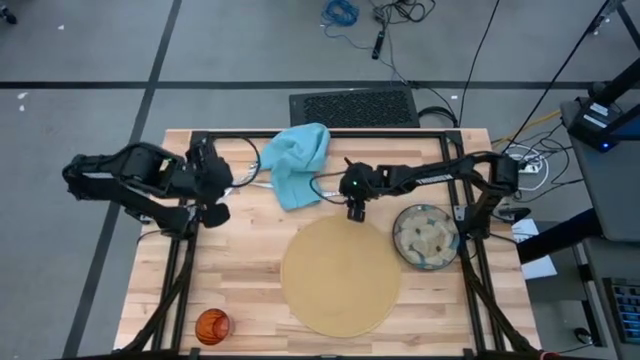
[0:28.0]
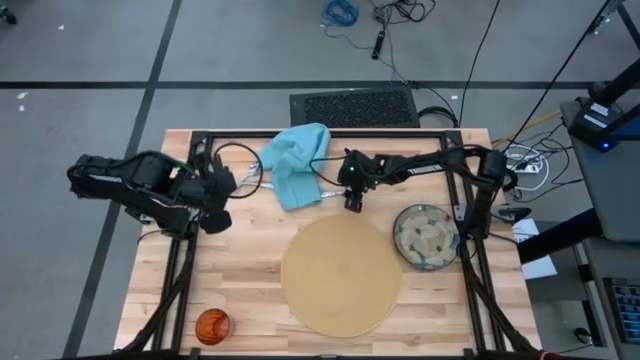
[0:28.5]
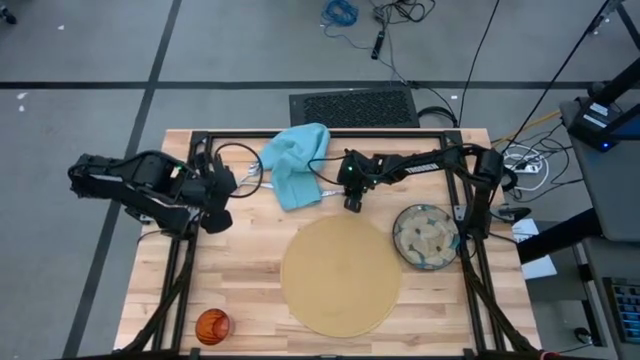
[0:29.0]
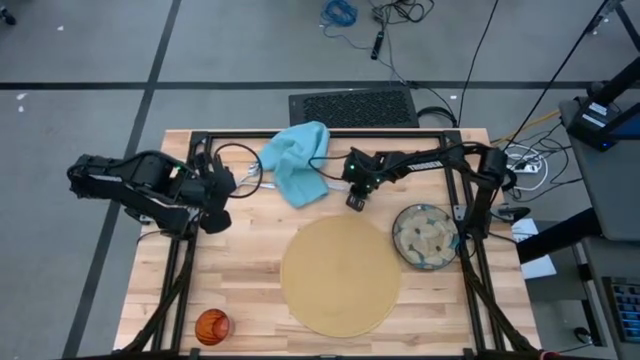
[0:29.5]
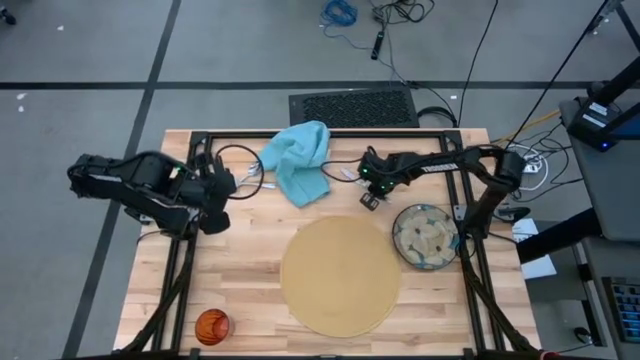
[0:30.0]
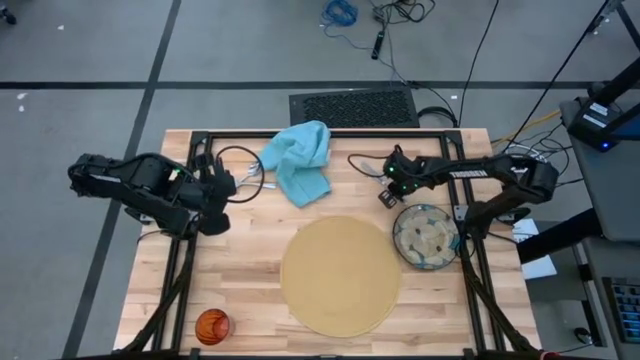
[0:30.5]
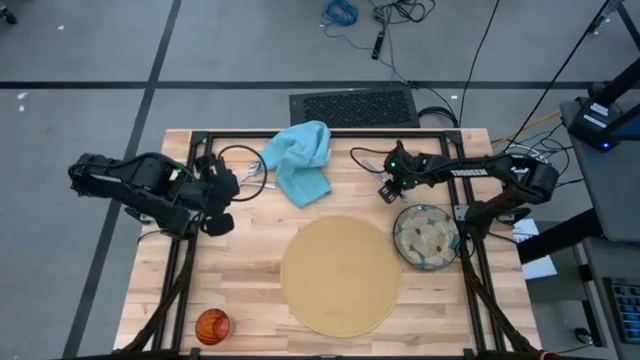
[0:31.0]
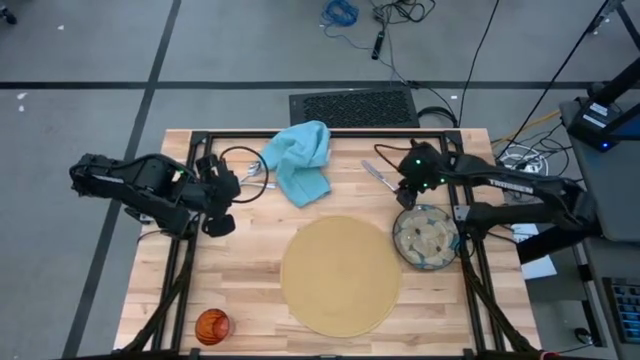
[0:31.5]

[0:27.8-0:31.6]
Task: Set table place
Move the silver knife to the top right of the table

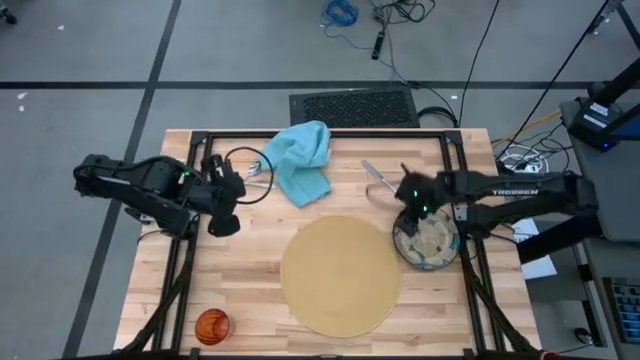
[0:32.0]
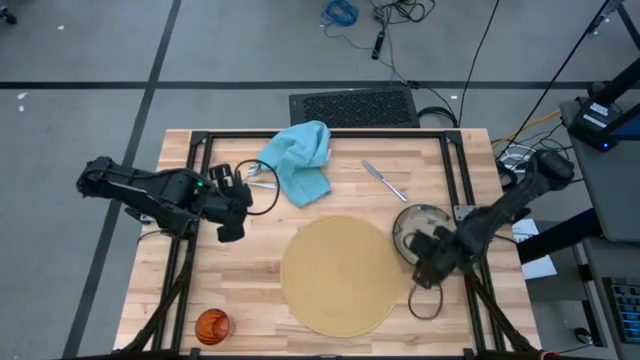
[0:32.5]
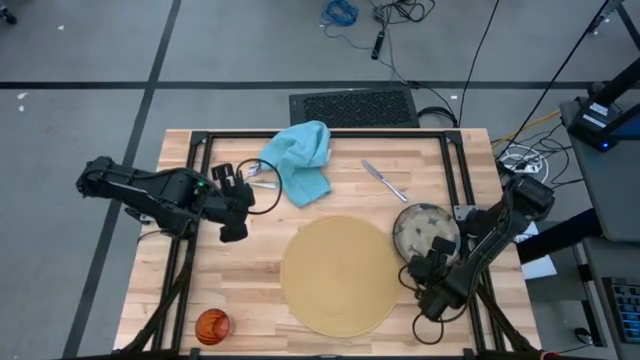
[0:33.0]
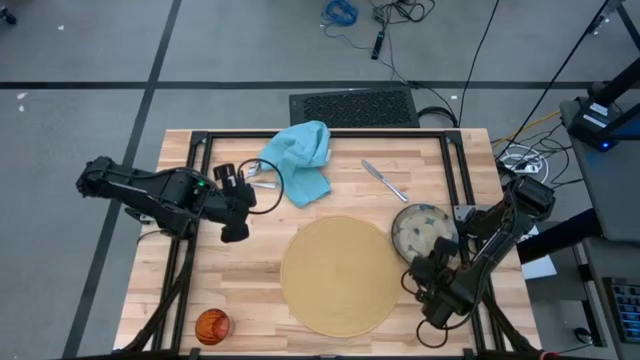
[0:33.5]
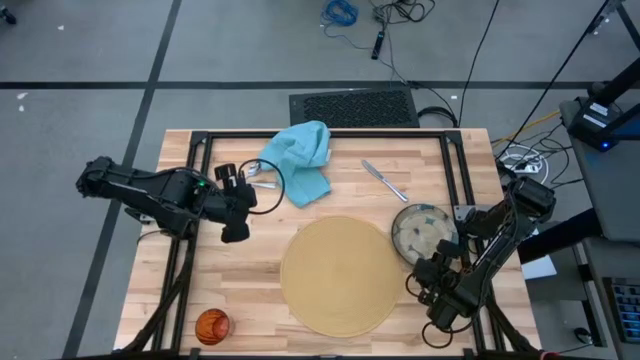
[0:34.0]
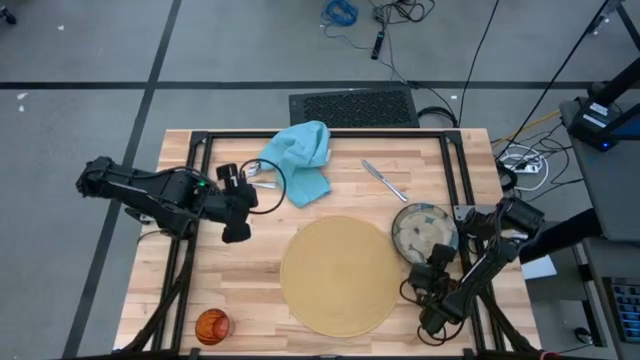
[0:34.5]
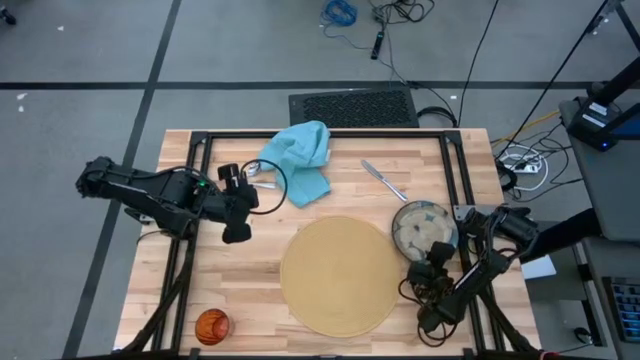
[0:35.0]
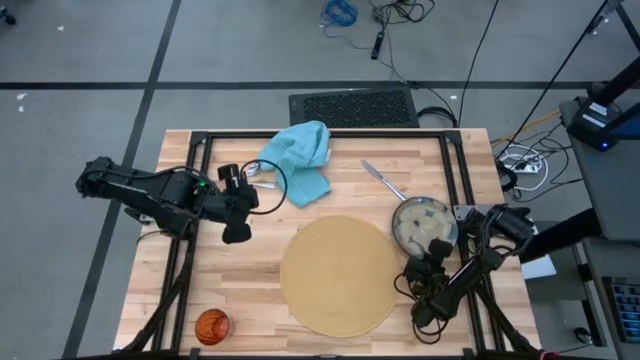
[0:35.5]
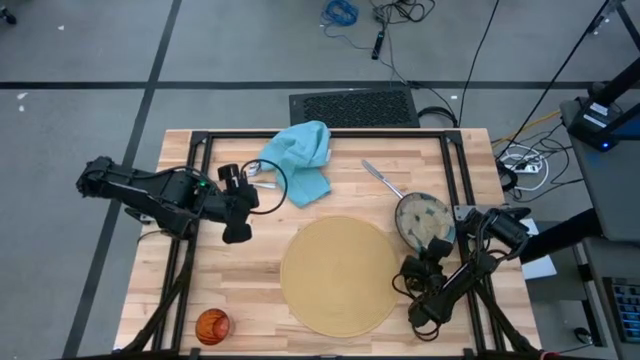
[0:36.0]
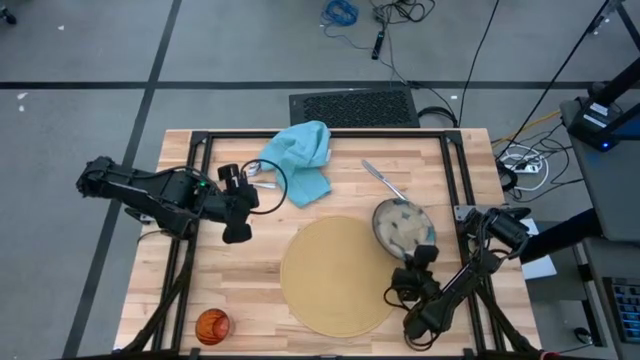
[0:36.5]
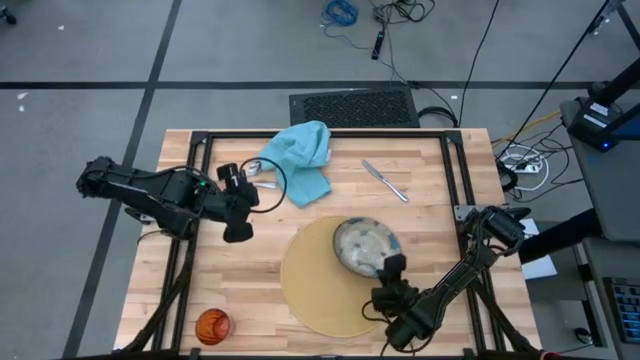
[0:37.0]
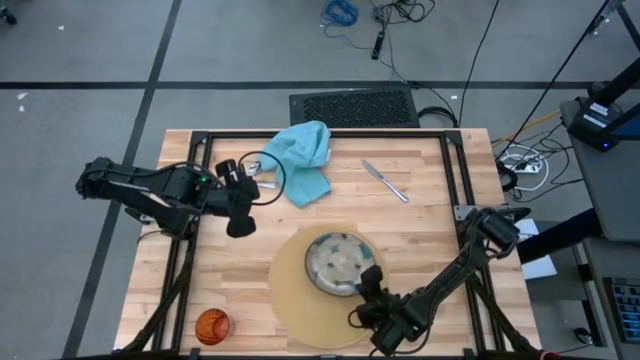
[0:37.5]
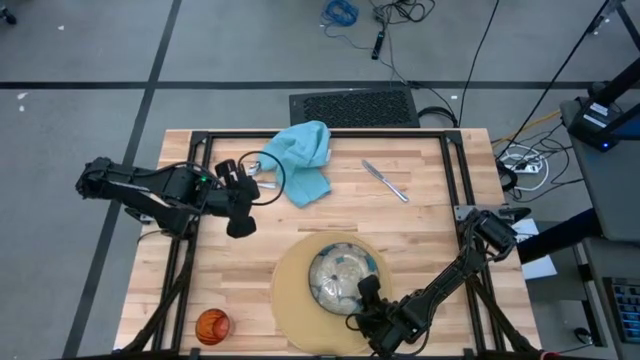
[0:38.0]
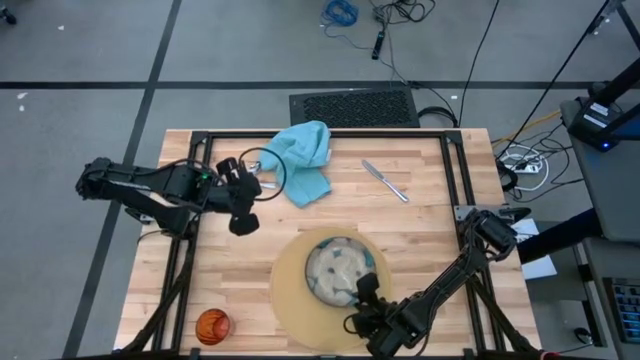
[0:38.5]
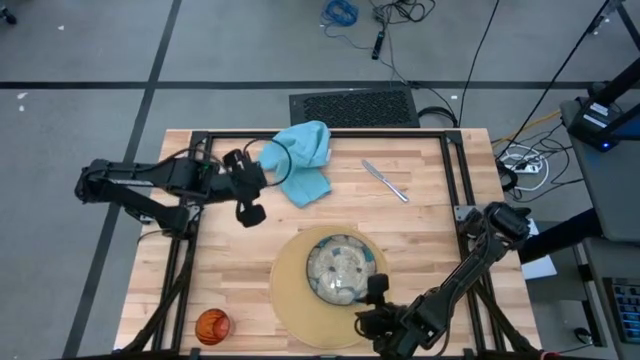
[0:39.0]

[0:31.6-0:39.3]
Put the pattern plate on the brown placemat

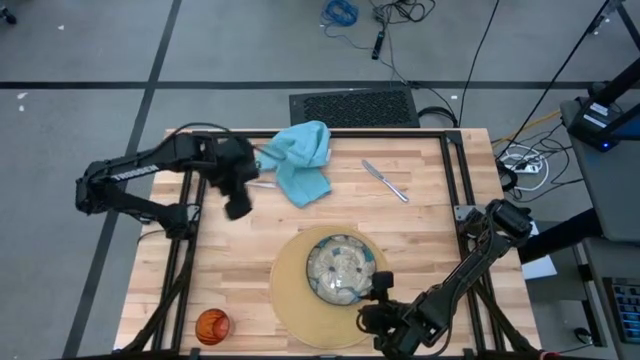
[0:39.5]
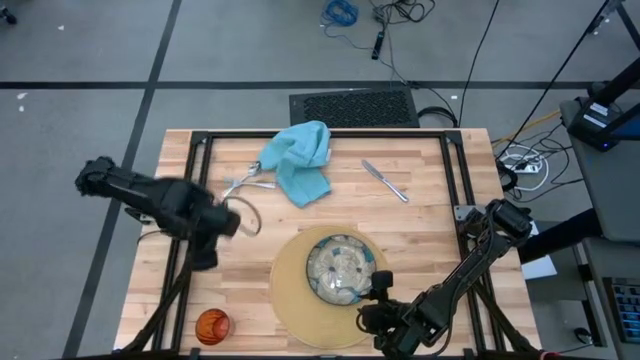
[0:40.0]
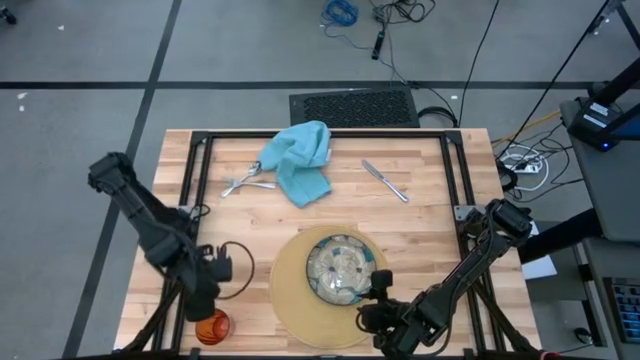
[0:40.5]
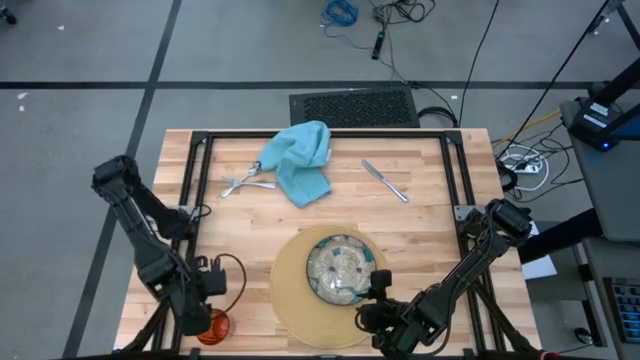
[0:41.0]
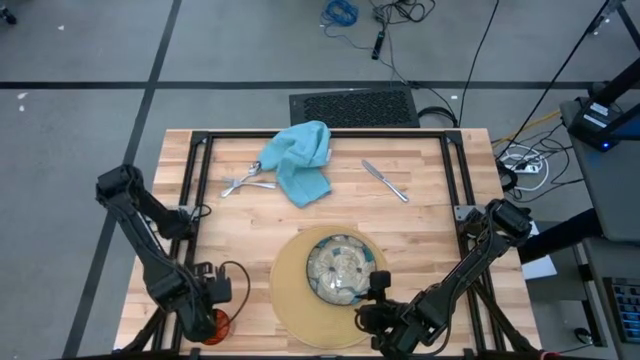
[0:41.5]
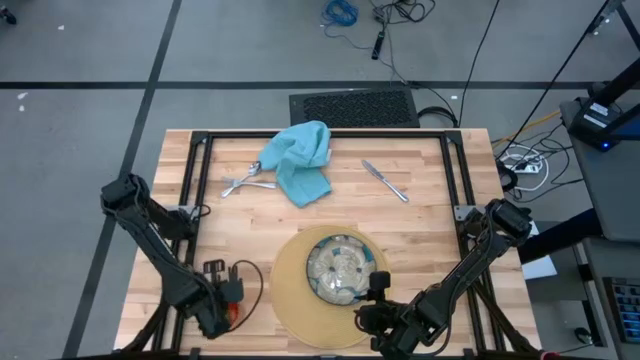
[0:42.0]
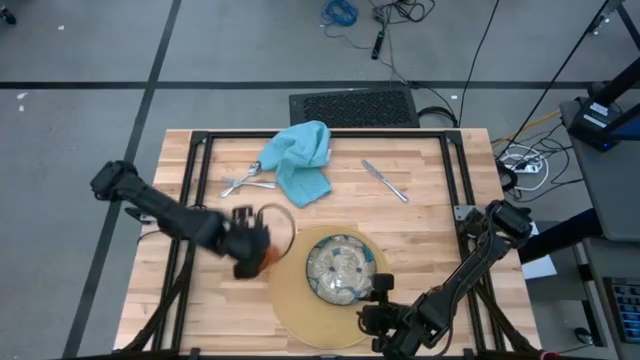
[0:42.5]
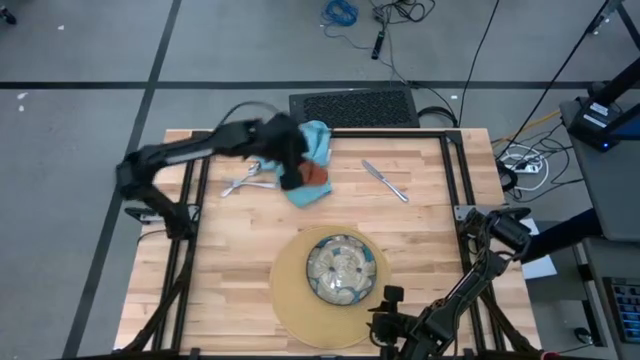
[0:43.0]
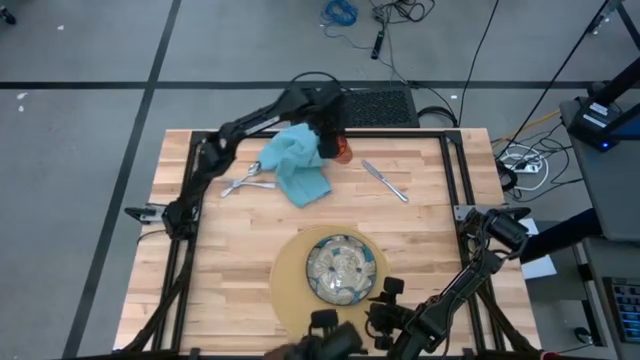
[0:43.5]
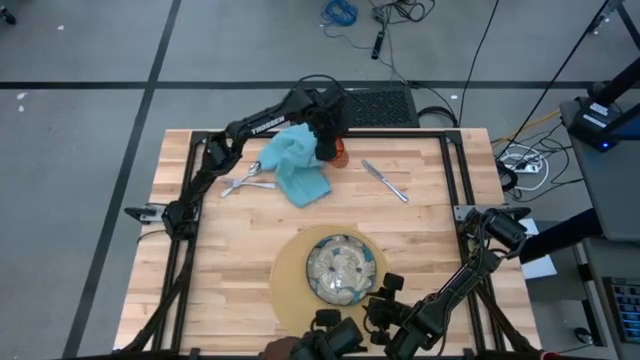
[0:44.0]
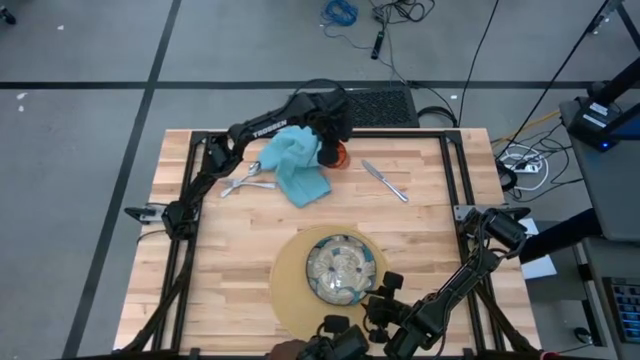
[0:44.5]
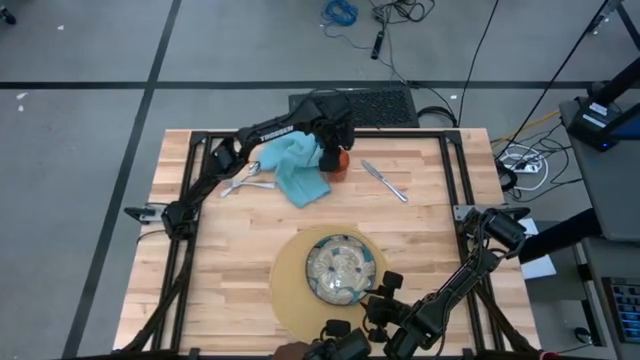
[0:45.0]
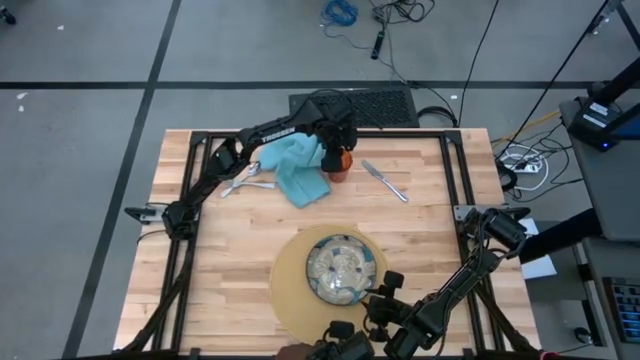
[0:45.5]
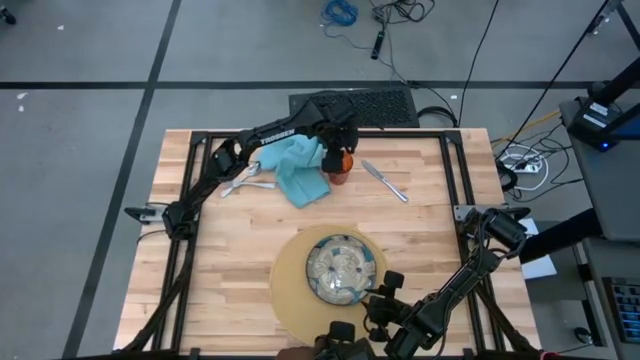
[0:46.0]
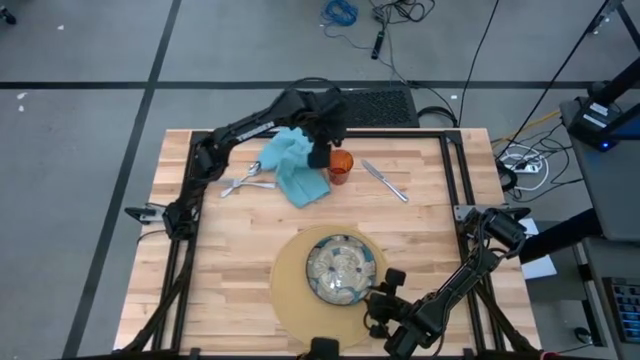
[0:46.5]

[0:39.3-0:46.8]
Move the brown cup to the top center of the table

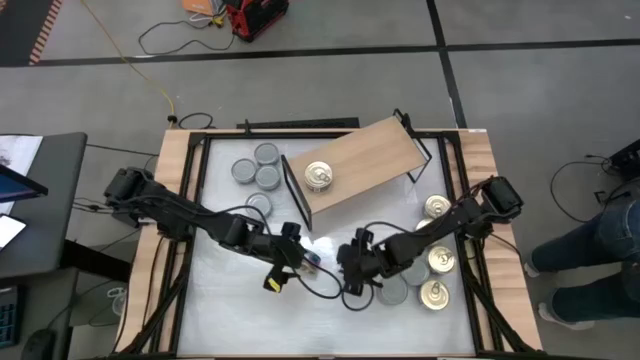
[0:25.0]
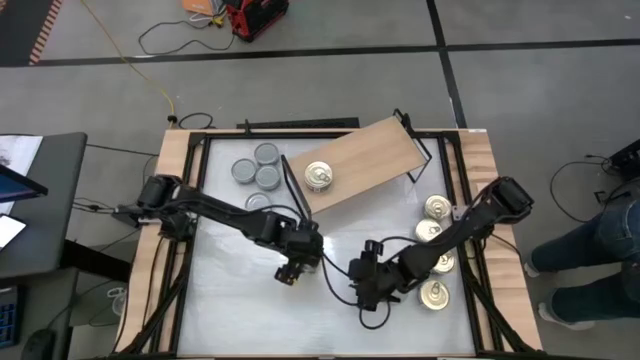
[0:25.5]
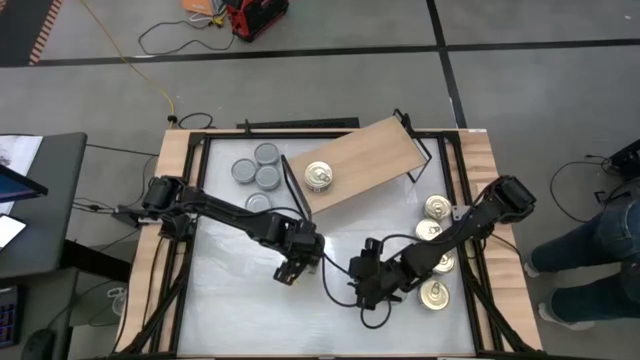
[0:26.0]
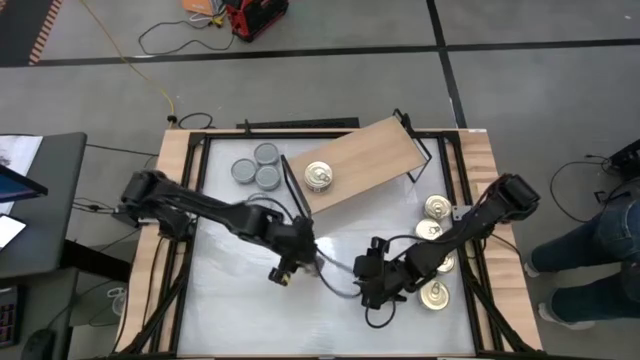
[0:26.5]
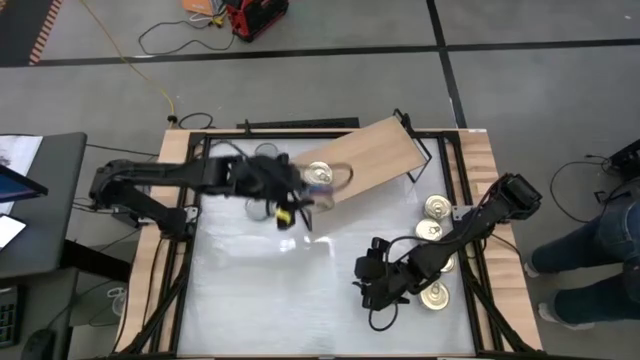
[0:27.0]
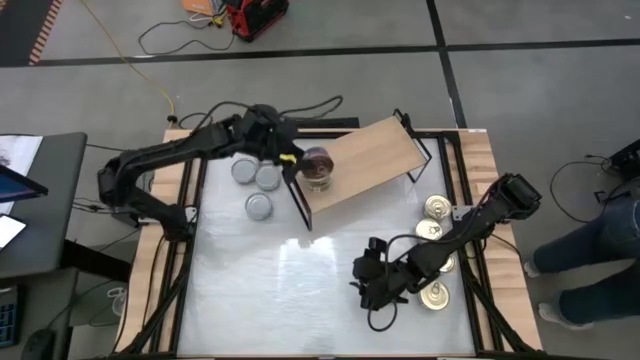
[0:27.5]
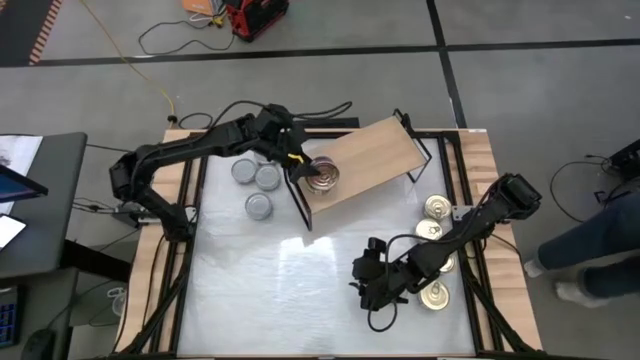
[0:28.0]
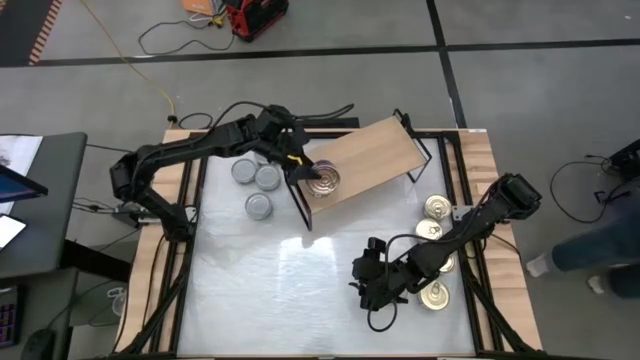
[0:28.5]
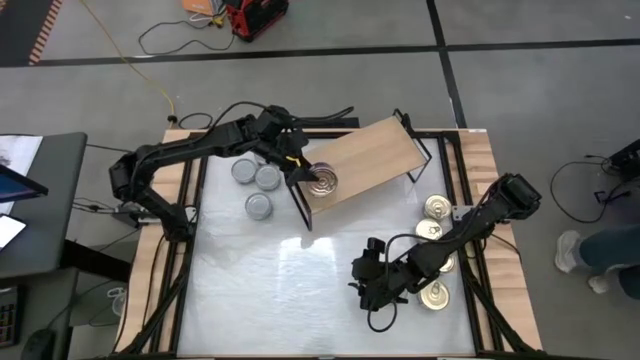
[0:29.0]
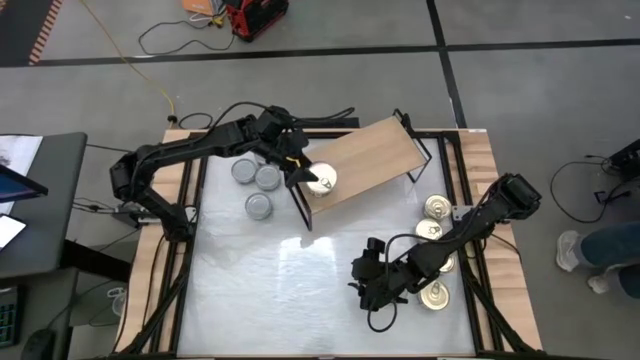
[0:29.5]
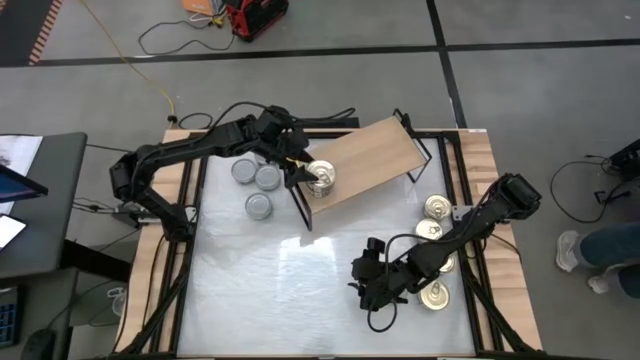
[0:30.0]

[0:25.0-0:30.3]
Task: Stack canned seafood by type on shelf
Stack the blue tuna can on top of the blue tuna can
